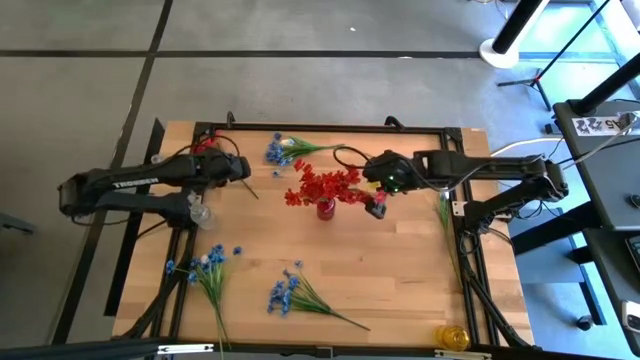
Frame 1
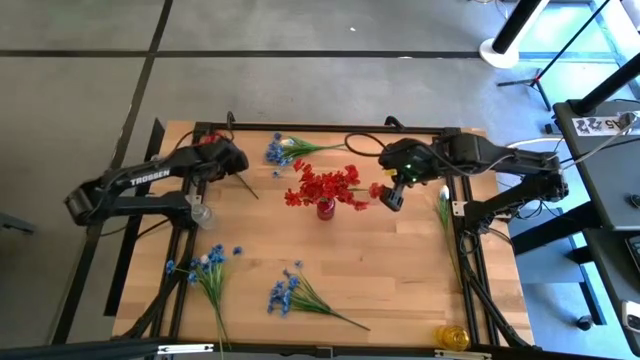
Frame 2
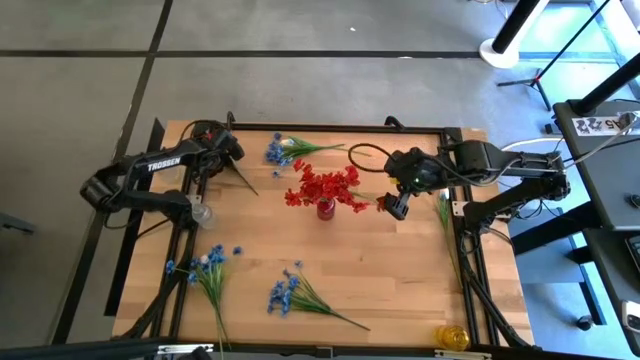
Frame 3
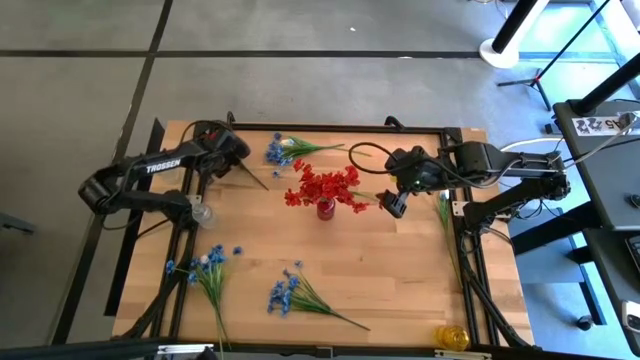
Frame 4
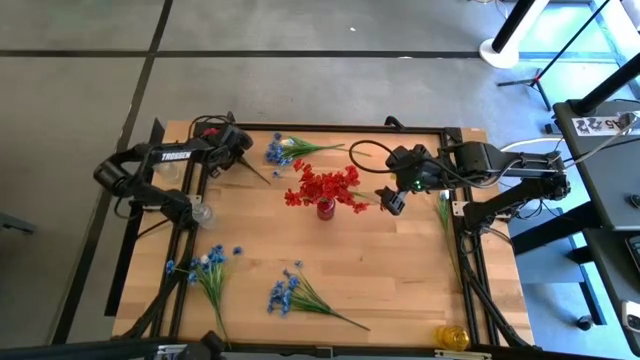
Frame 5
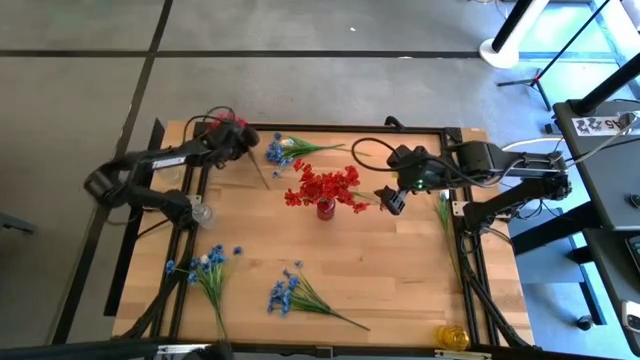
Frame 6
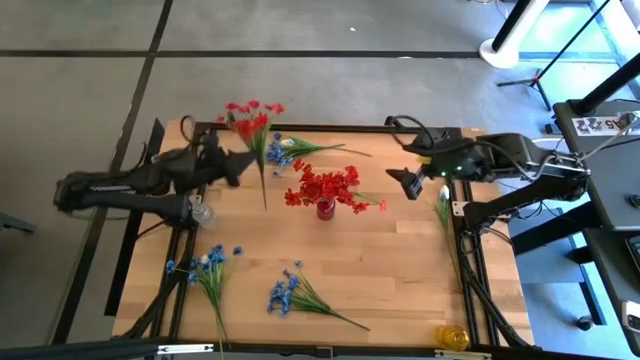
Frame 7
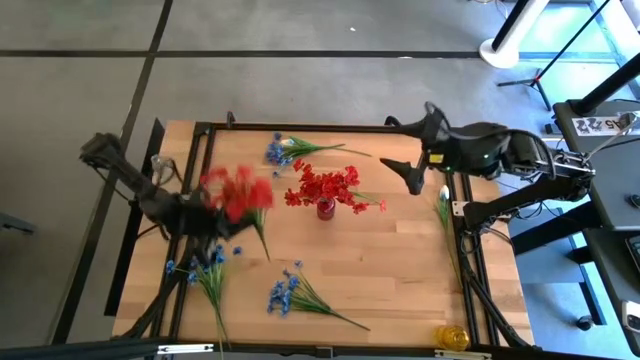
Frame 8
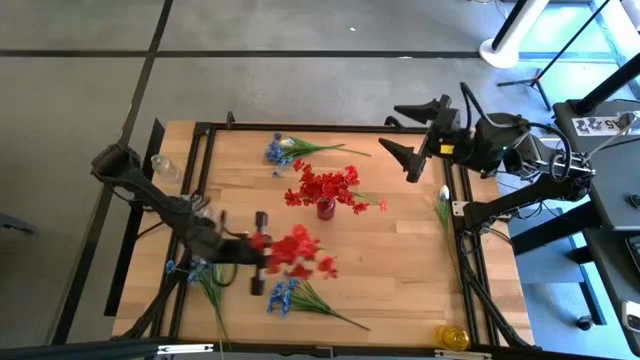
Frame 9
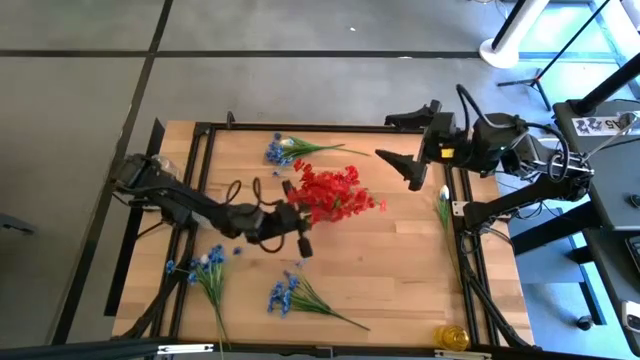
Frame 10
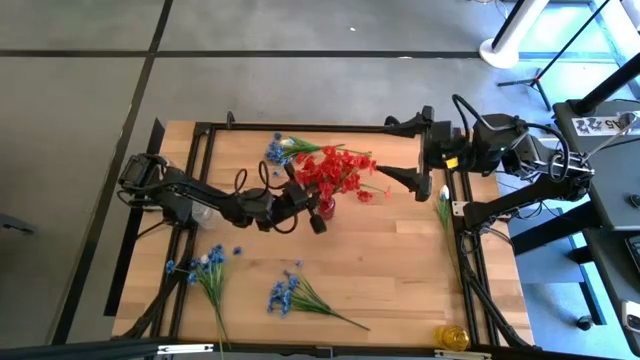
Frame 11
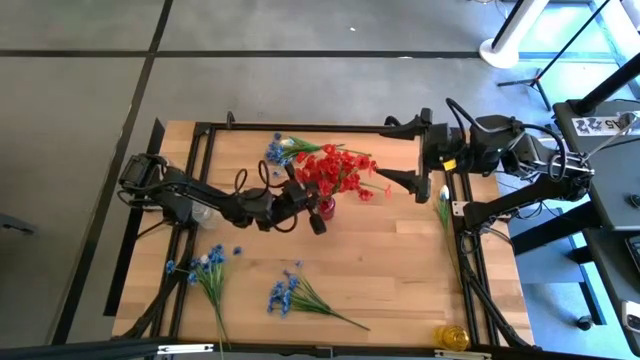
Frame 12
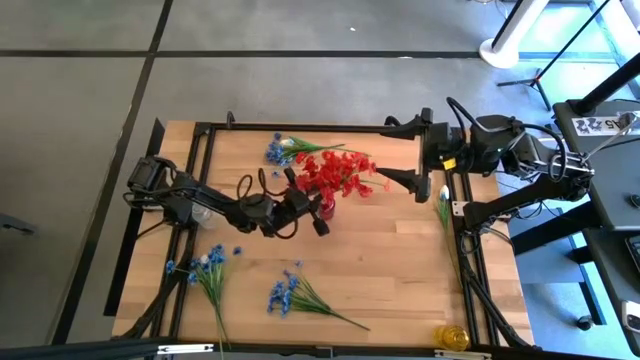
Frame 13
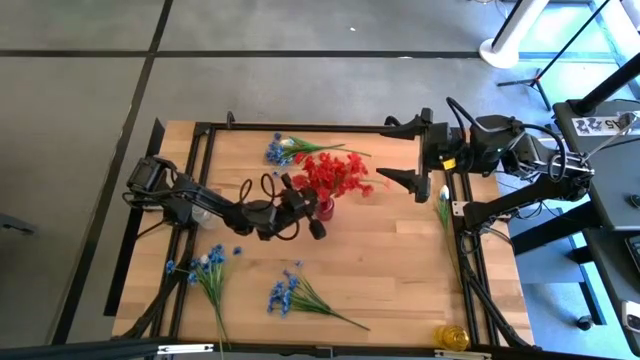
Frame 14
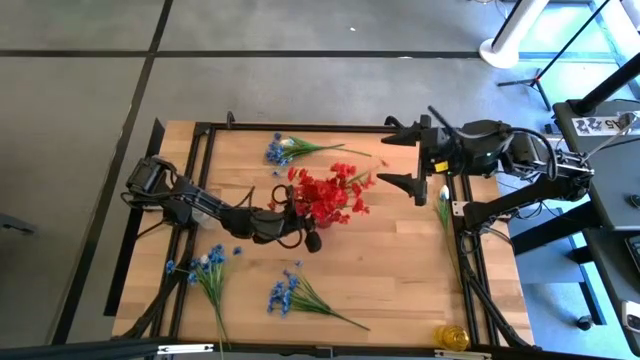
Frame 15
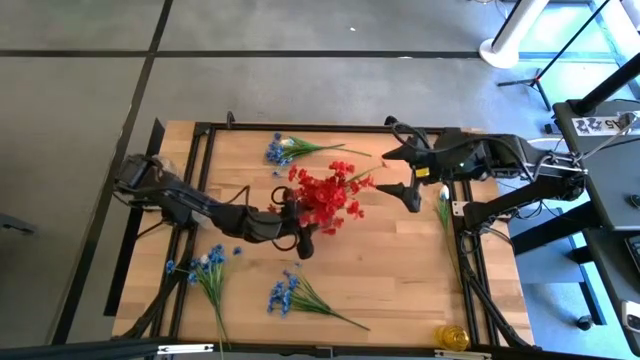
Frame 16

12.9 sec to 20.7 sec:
Task: Sort flowers into vase by color
Put the red flowers into the red vase

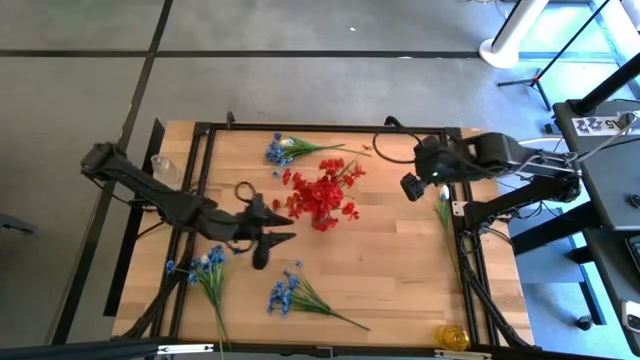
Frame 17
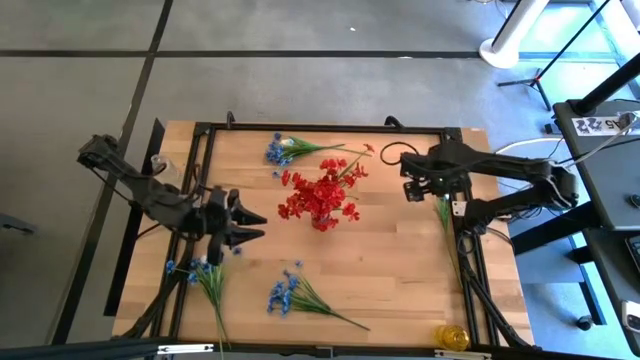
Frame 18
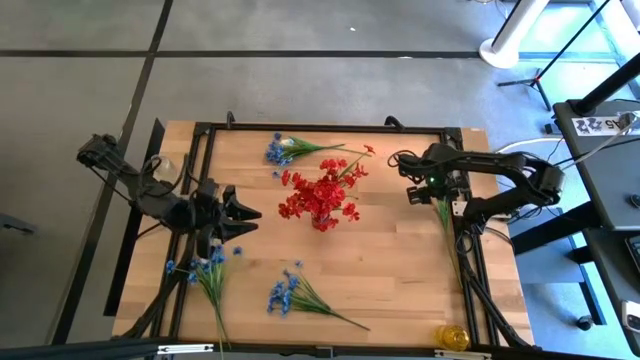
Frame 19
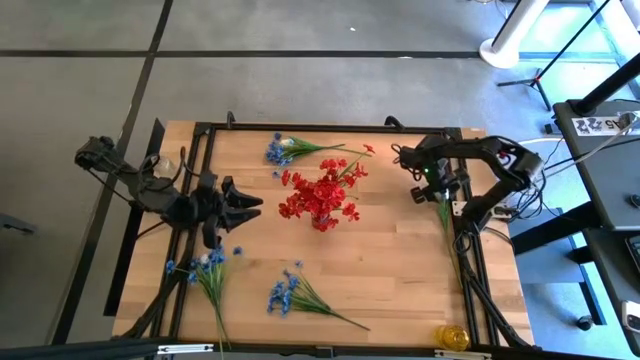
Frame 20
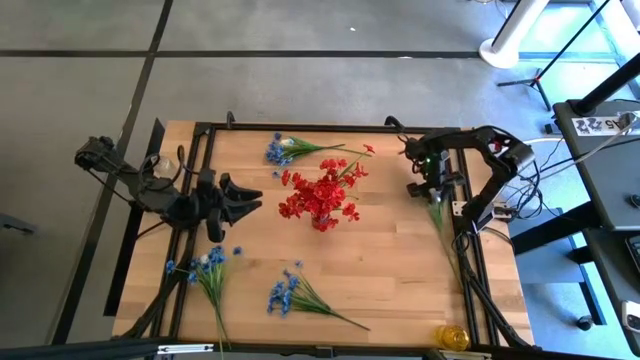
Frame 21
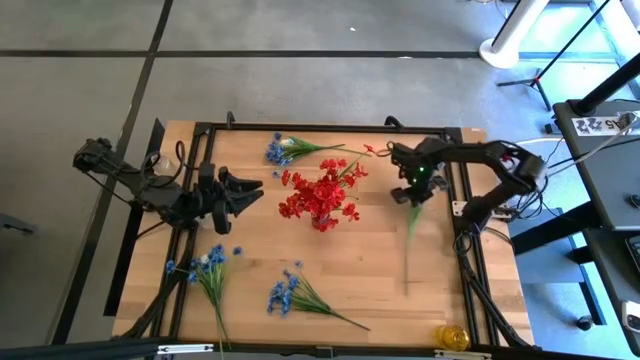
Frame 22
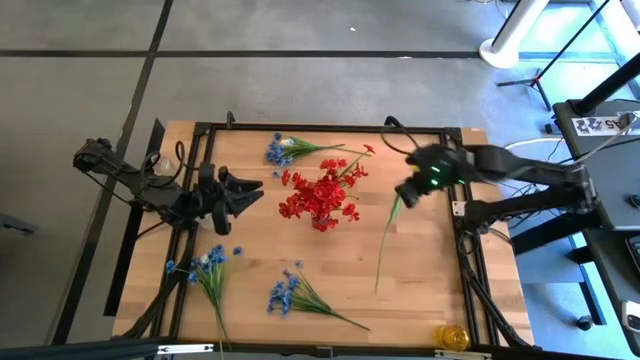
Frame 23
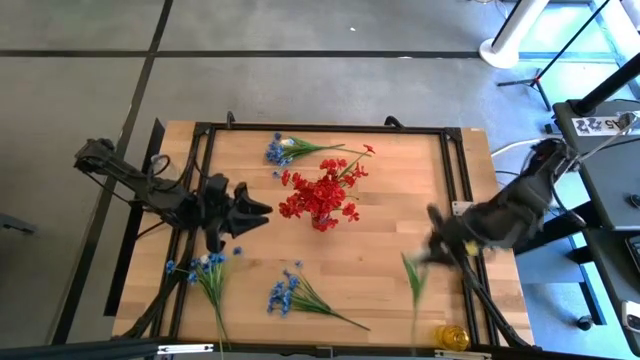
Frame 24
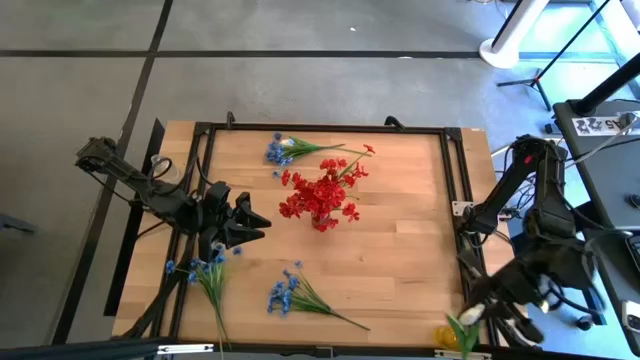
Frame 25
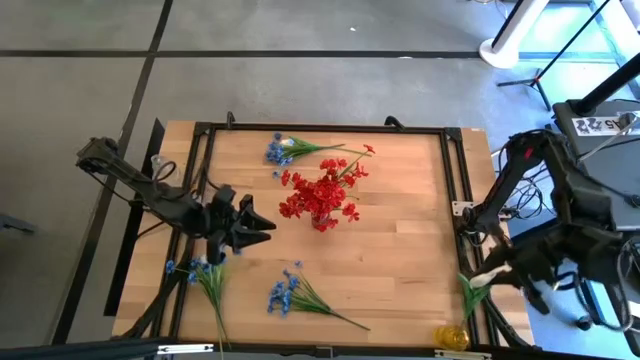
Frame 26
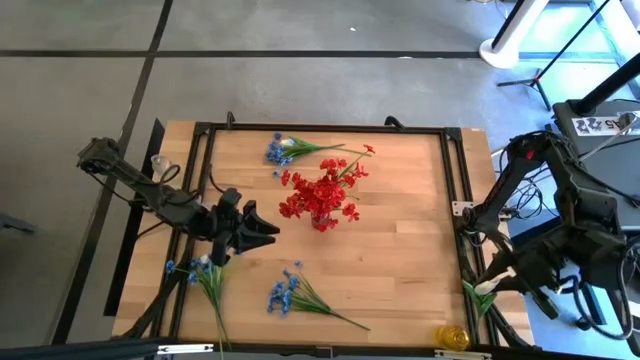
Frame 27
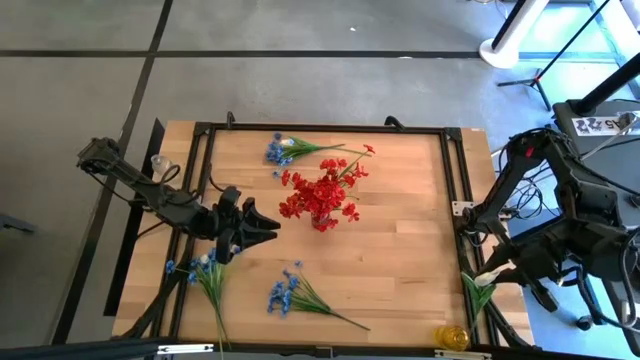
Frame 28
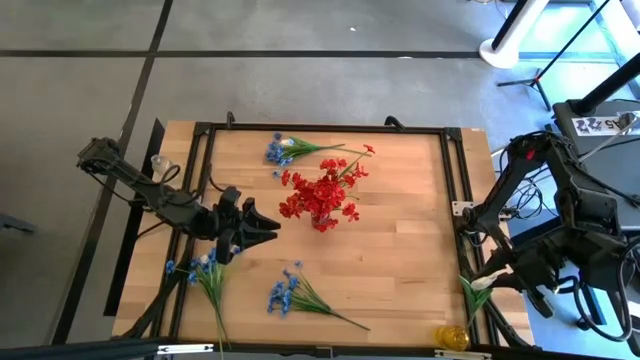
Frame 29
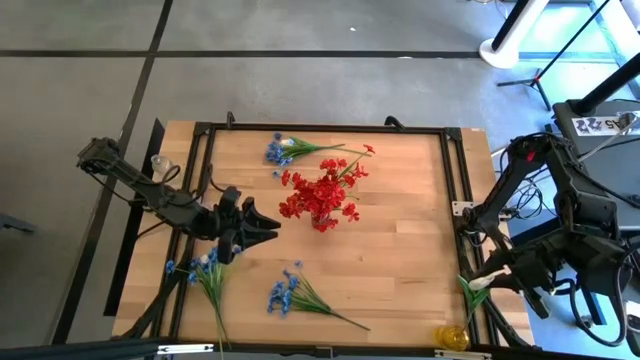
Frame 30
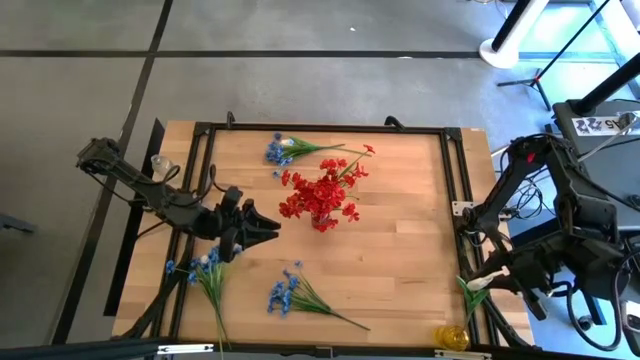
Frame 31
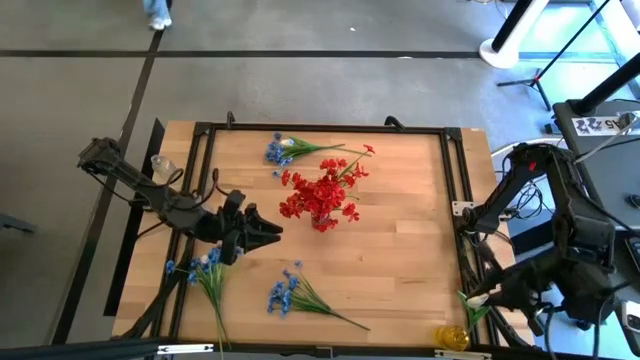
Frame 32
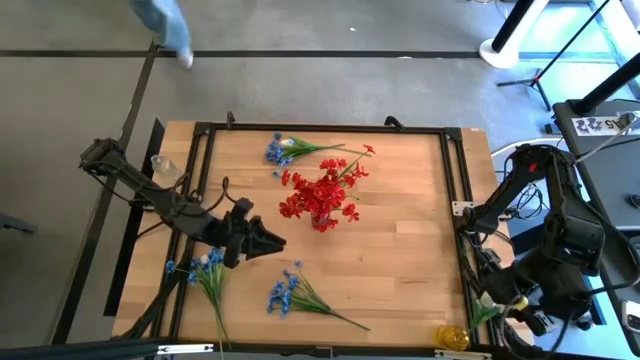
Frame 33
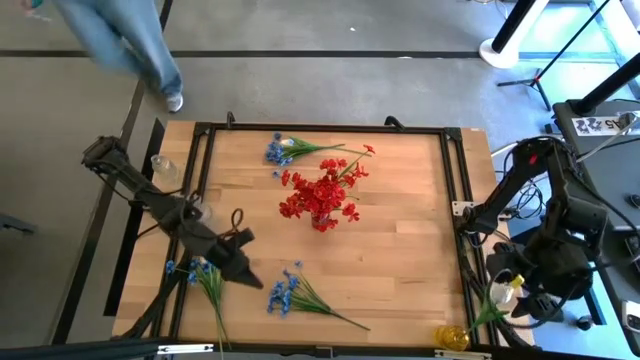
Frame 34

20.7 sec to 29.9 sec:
Put the middle right white flower into the yellow vase

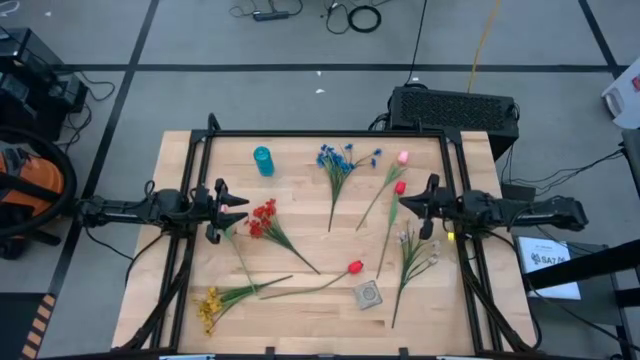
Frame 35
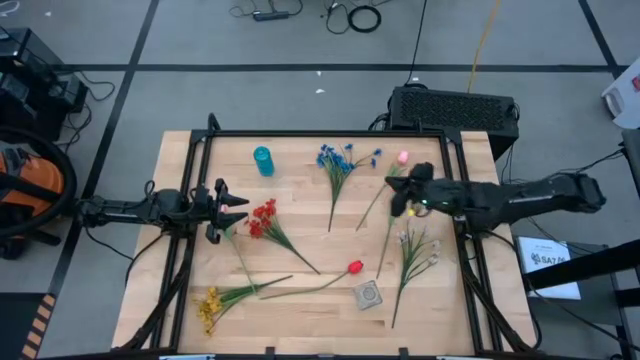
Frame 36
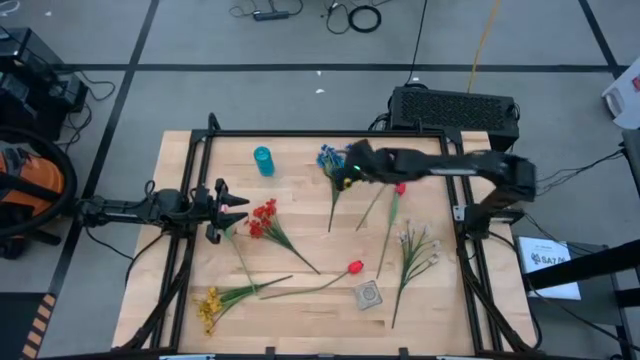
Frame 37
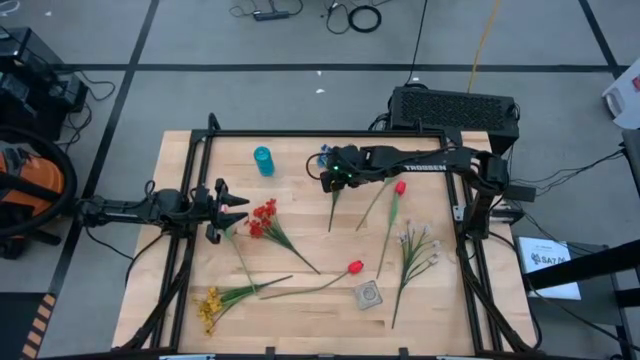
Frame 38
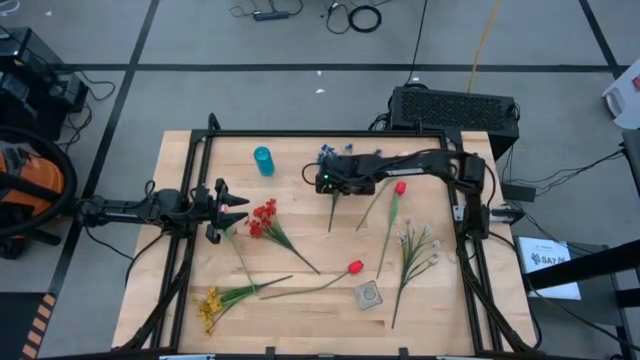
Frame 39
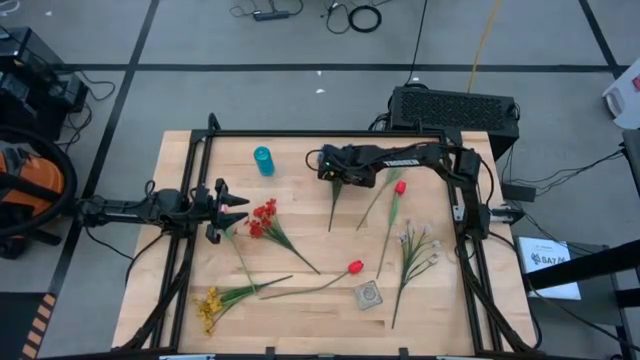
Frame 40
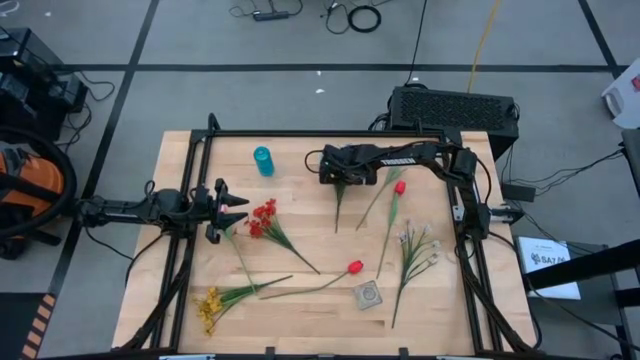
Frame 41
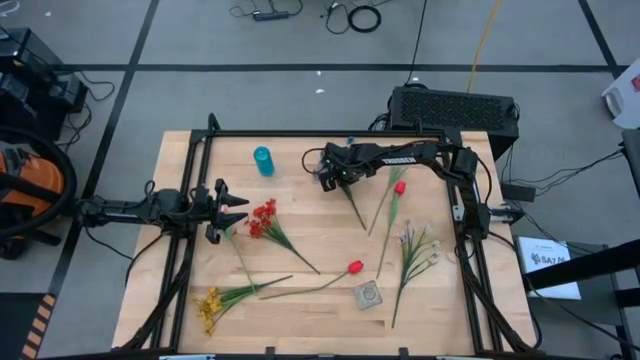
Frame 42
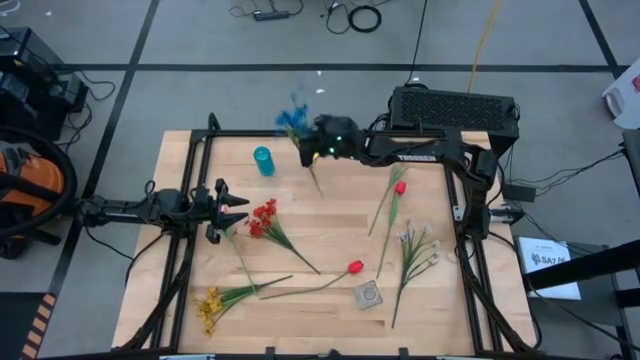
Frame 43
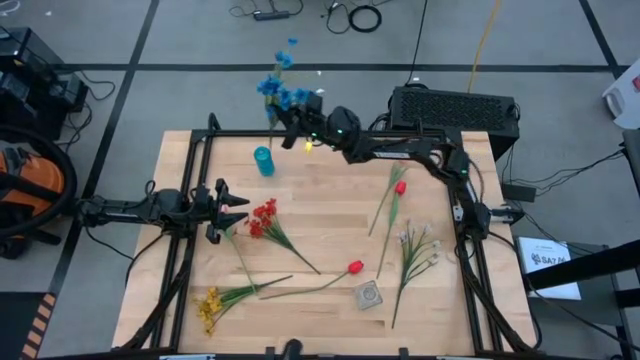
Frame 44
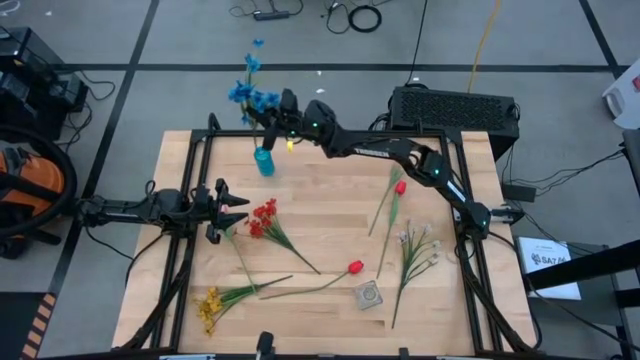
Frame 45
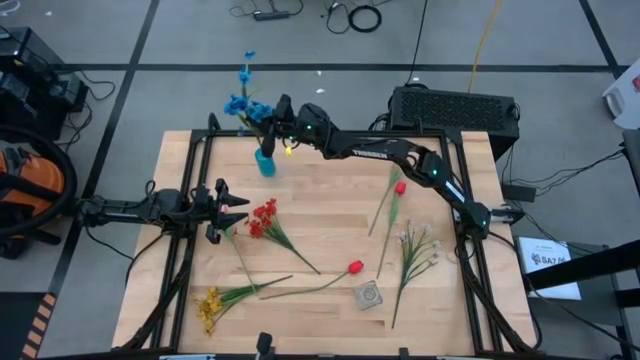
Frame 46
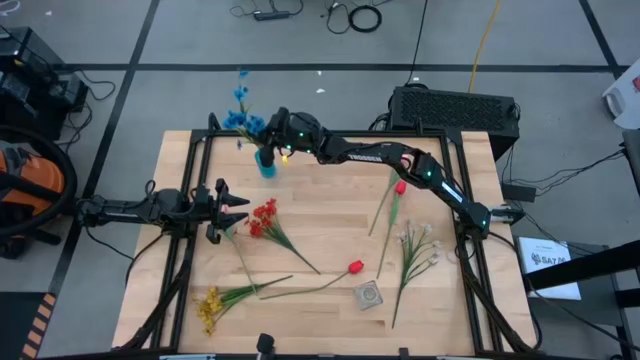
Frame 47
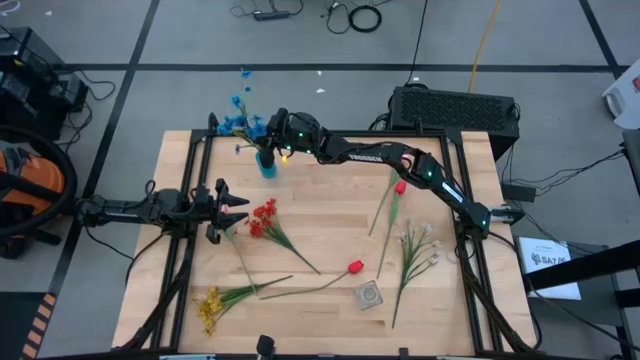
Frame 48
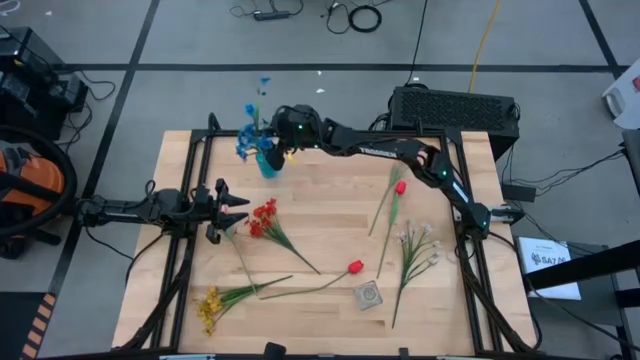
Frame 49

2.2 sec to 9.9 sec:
Task: Sort flowers into vase by color
Put the blue flower into the blue vase
